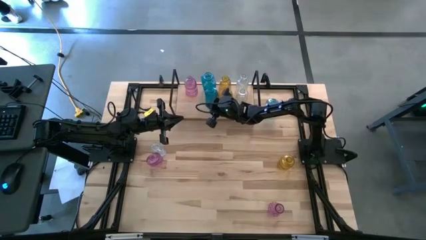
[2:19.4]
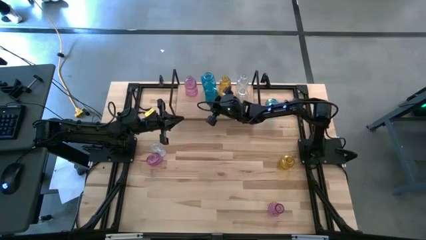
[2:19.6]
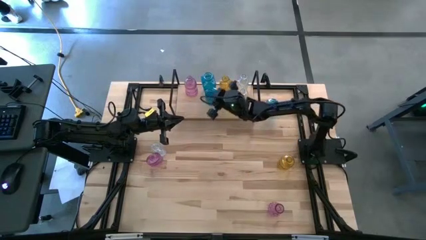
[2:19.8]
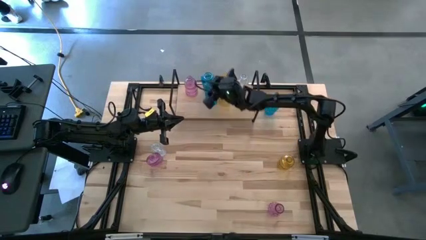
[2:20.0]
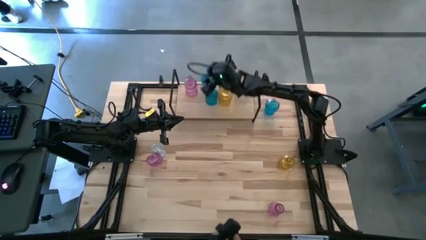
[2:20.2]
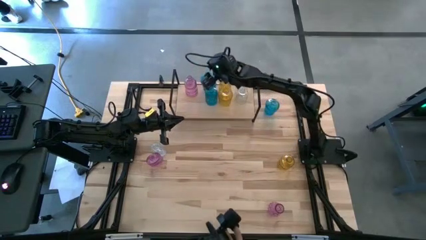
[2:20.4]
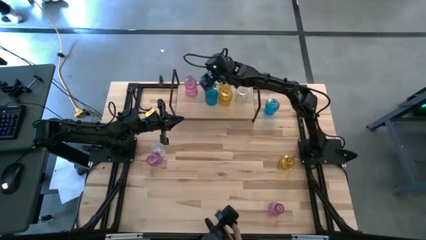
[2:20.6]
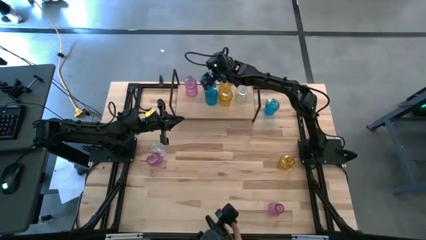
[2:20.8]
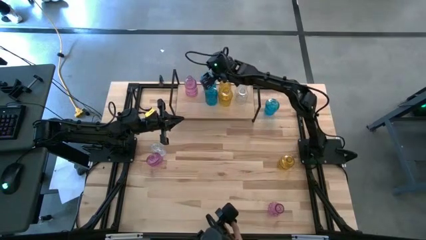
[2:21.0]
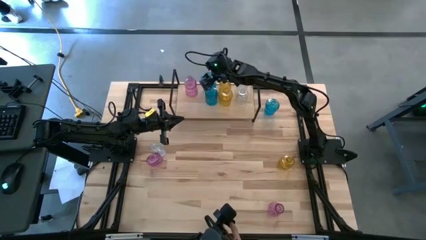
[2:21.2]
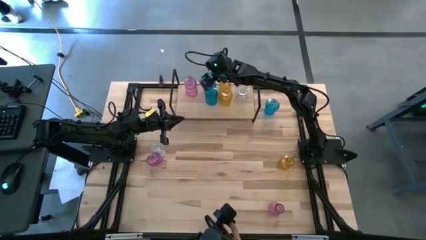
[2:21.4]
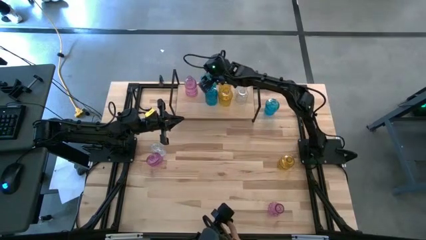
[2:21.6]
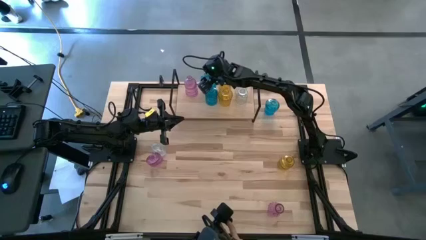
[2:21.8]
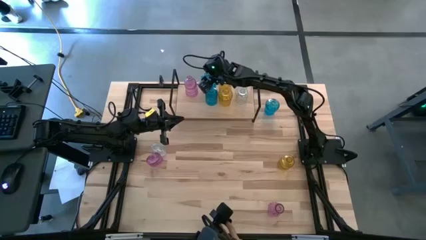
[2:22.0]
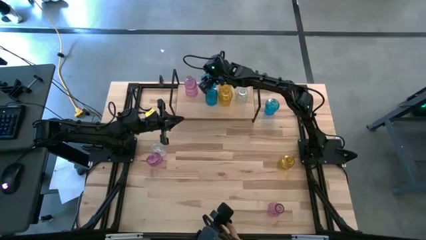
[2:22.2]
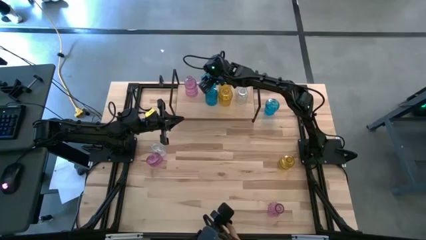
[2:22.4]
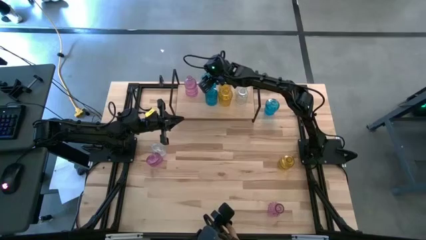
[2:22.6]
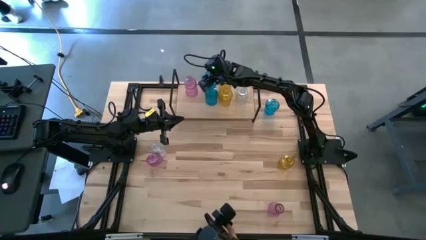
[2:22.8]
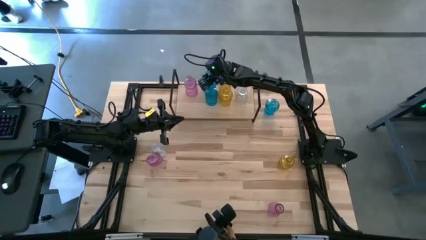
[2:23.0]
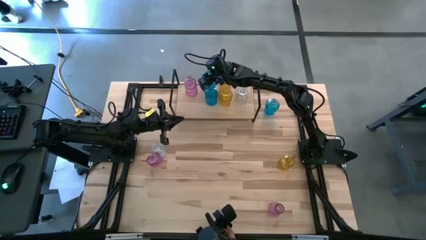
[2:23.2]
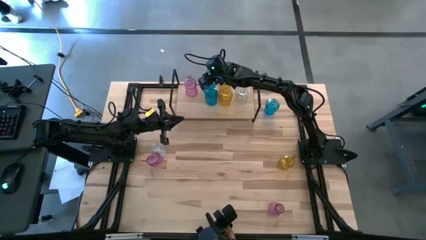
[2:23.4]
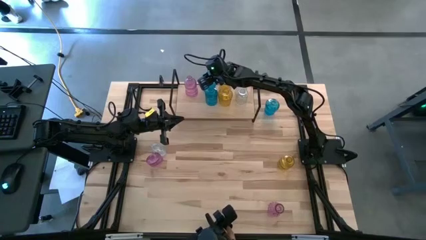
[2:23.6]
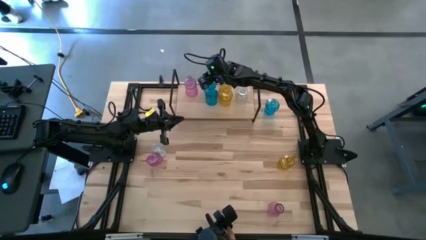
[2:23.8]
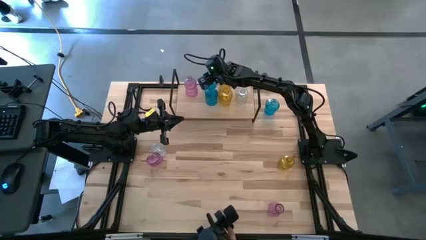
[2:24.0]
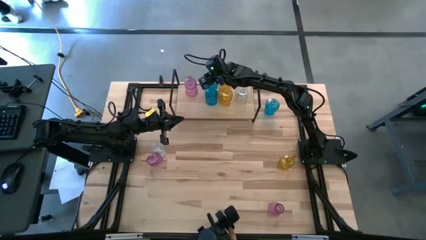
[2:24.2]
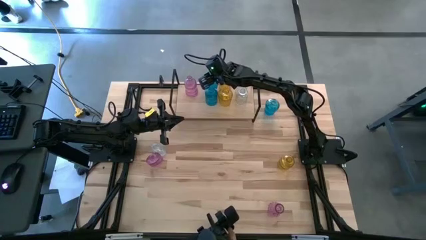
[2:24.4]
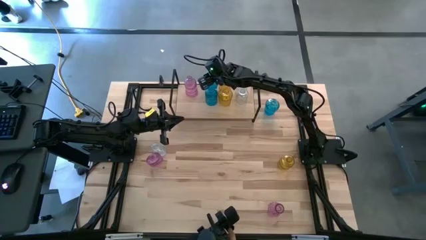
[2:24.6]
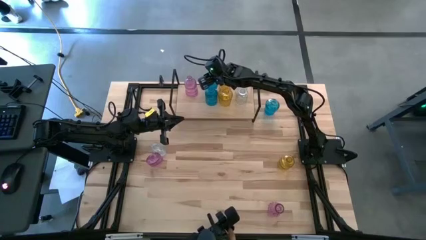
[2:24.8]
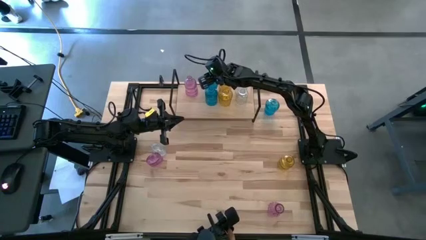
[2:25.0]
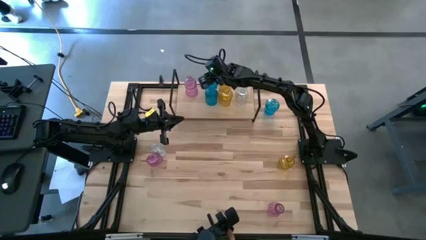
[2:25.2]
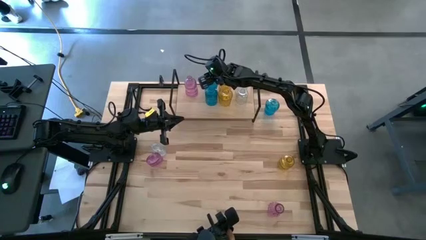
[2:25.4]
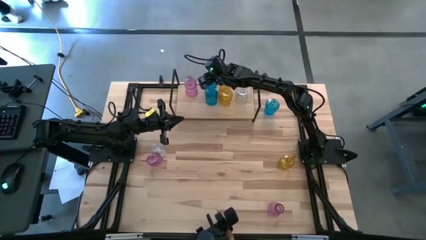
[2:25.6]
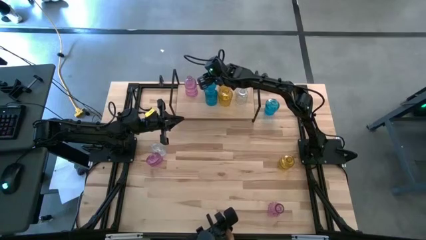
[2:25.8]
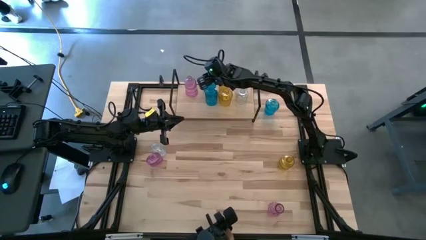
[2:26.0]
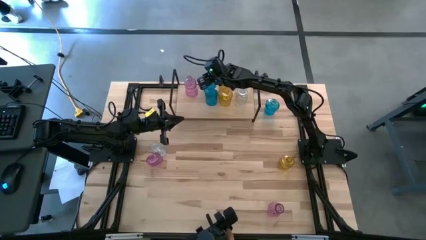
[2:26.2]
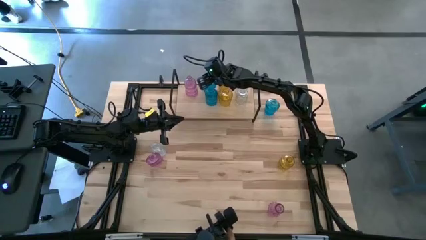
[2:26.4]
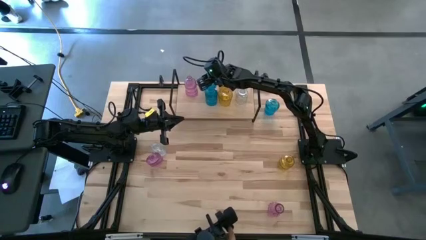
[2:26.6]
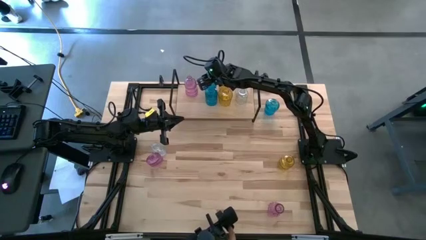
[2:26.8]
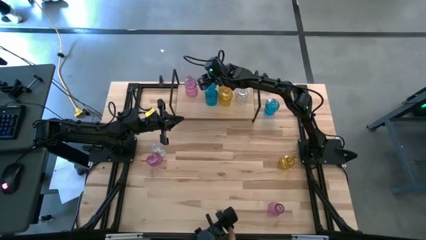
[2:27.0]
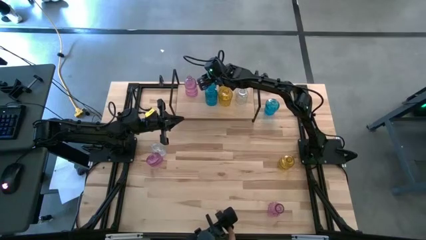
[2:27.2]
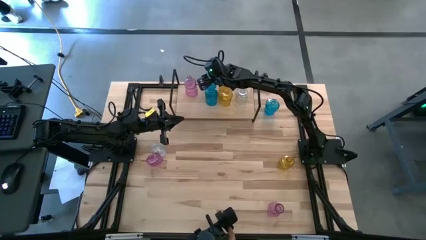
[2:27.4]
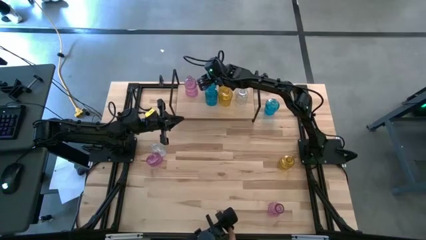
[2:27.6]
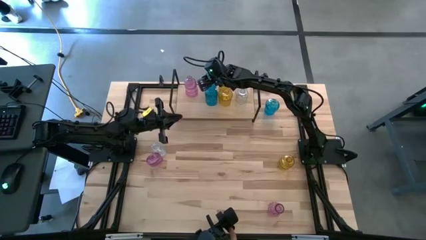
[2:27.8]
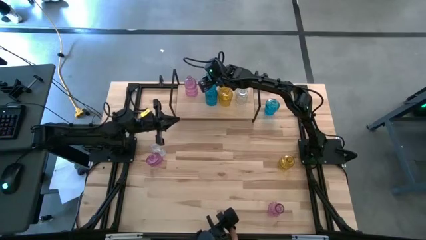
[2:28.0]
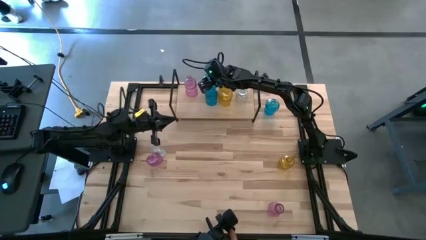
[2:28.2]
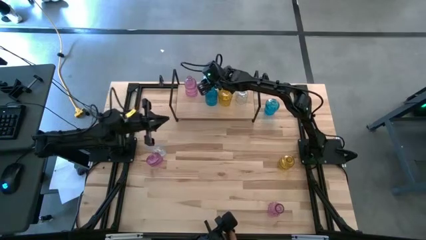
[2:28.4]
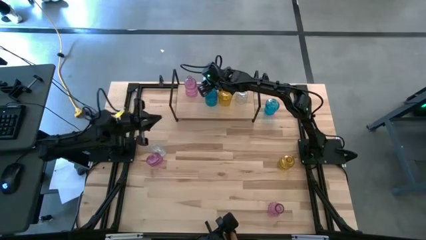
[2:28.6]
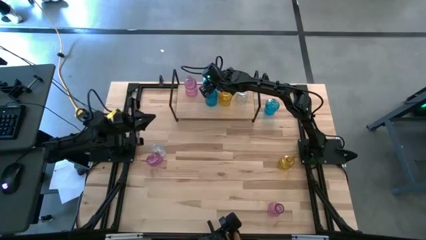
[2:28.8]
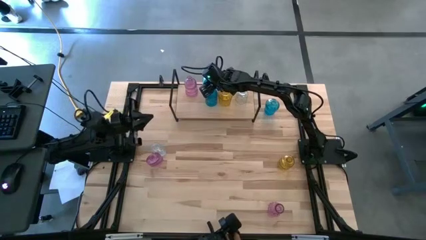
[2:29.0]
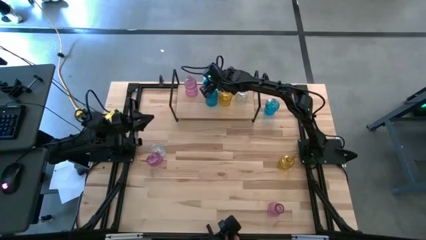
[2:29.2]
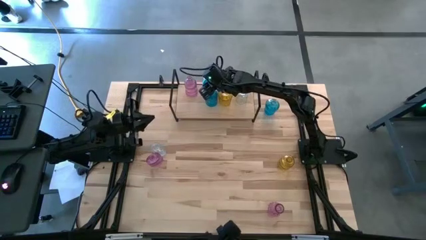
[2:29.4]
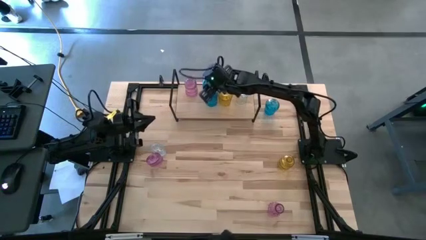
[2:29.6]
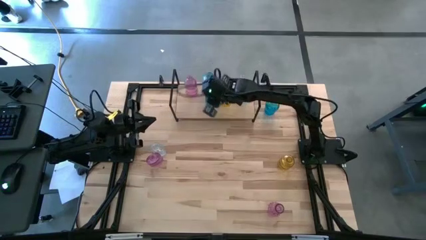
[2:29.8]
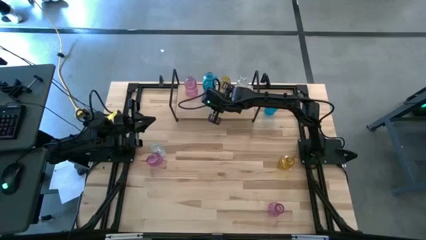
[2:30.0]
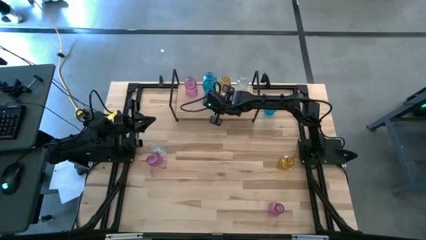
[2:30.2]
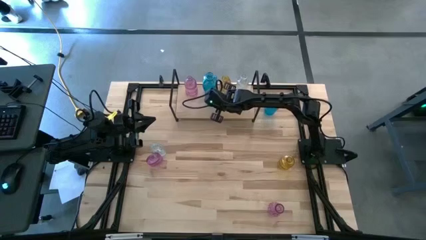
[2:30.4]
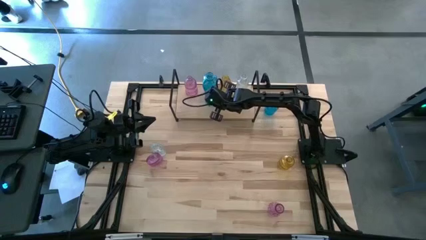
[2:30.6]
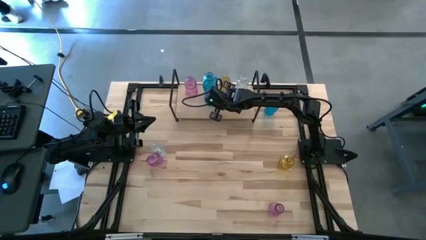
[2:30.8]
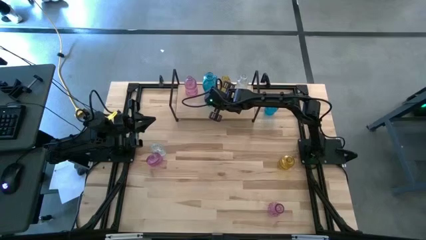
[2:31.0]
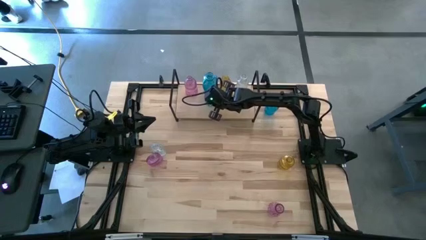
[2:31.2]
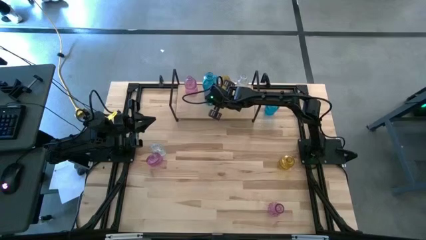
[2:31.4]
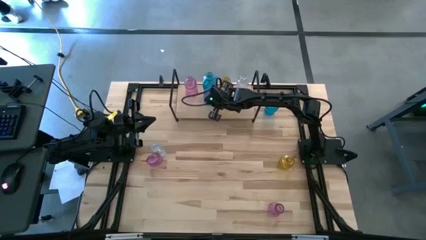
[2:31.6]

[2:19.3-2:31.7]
Task: sort vases onto shelf
Adjust the blue vases on the shelf

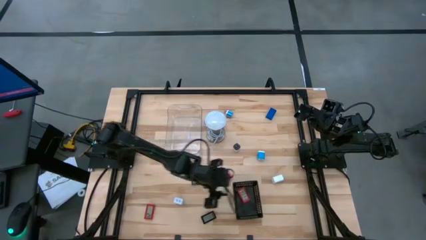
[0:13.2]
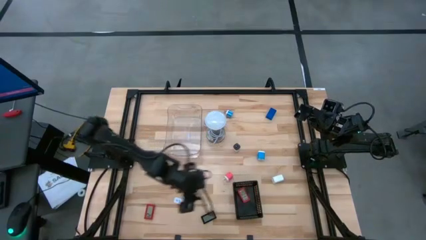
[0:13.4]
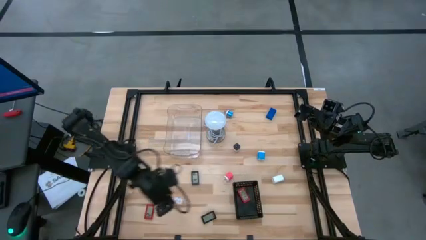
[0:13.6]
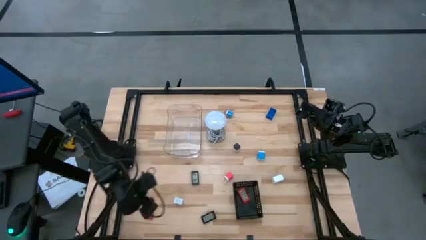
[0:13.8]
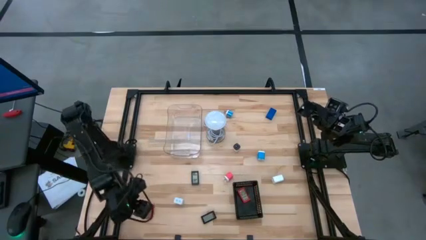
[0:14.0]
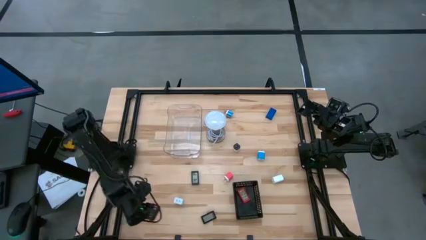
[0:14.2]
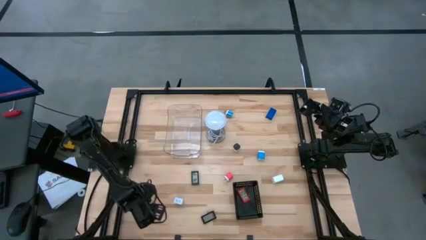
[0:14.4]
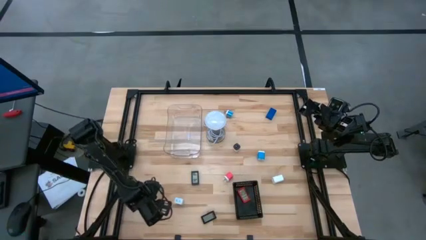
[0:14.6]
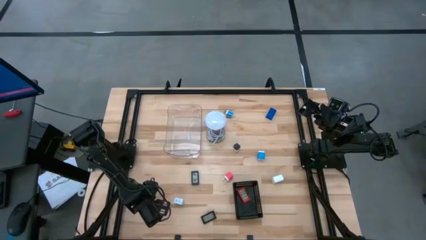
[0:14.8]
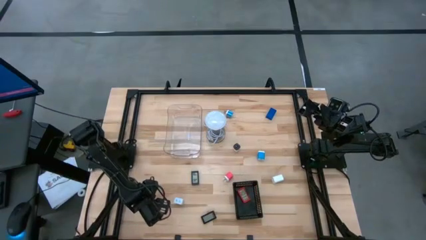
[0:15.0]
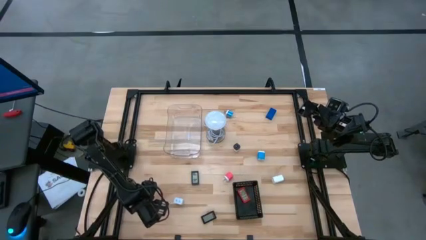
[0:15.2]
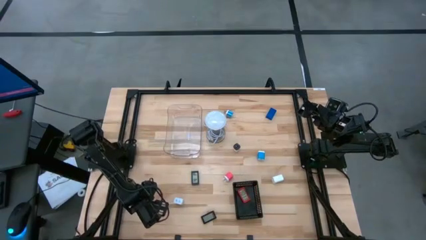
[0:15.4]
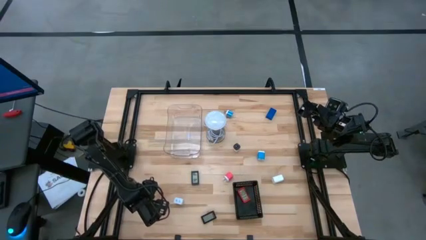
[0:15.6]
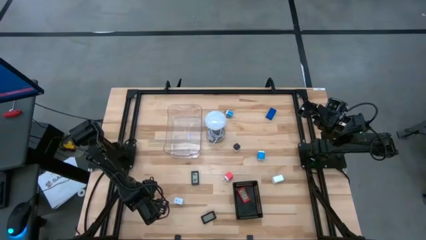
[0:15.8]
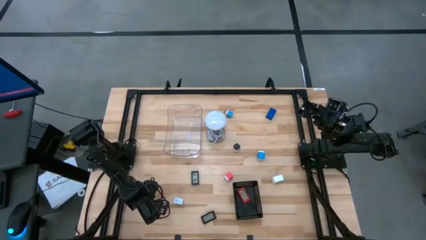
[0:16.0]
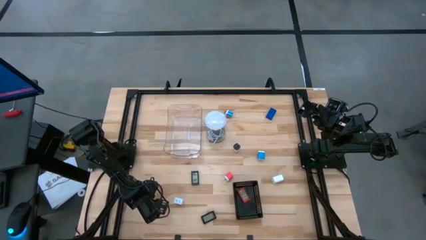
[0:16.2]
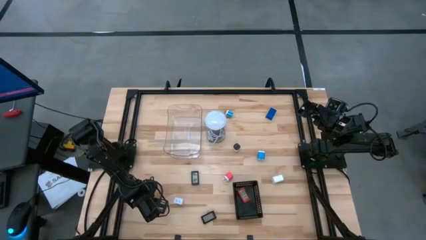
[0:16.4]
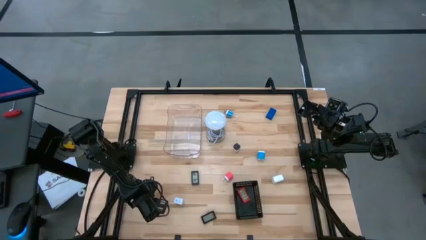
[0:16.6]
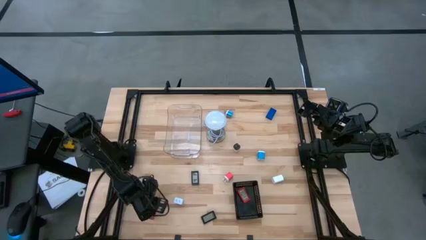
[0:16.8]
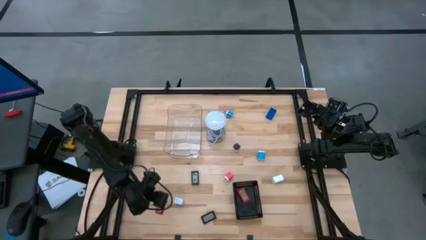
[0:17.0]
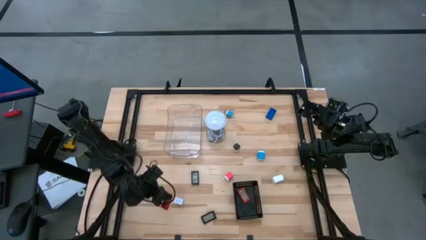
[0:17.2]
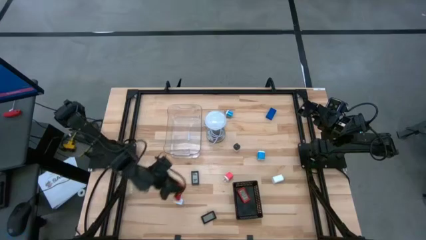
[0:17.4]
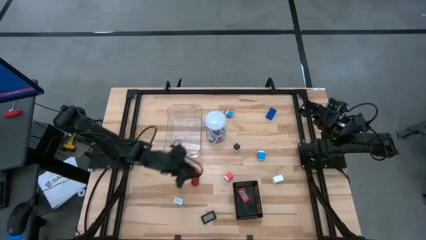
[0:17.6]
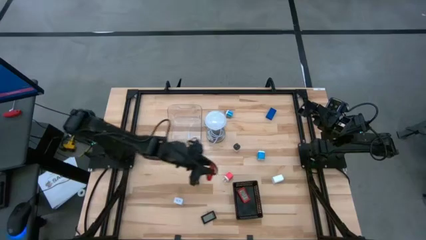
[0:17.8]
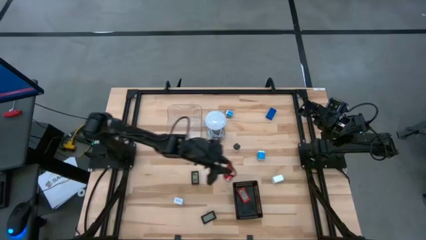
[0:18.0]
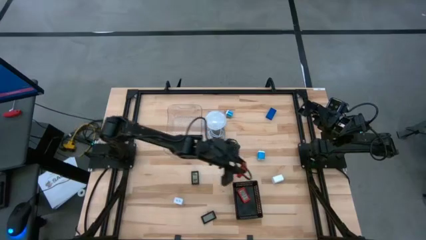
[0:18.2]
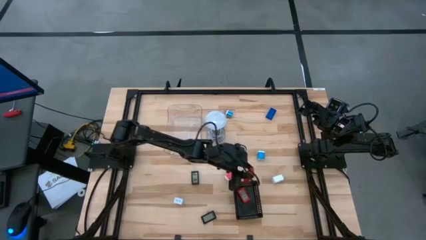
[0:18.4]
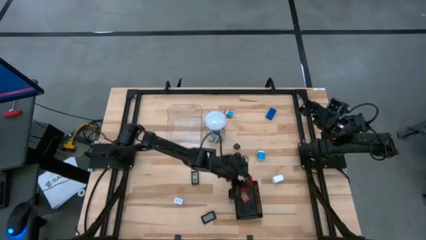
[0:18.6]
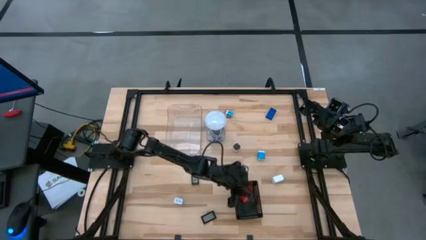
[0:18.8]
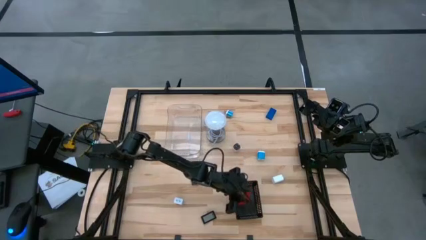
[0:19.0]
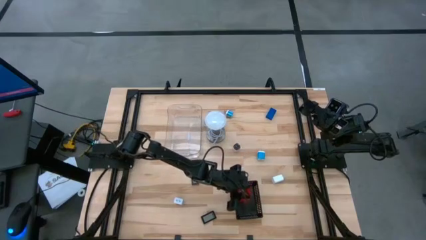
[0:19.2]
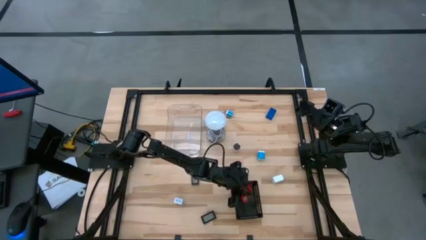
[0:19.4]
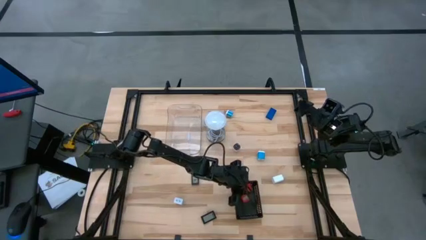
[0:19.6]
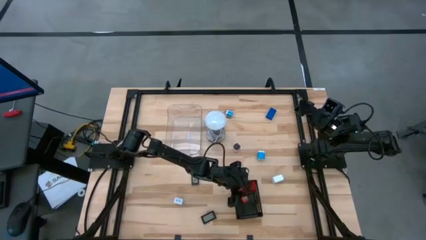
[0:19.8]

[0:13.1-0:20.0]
Task: Pick & Place Office items
Put the red digital clock into the black bin
